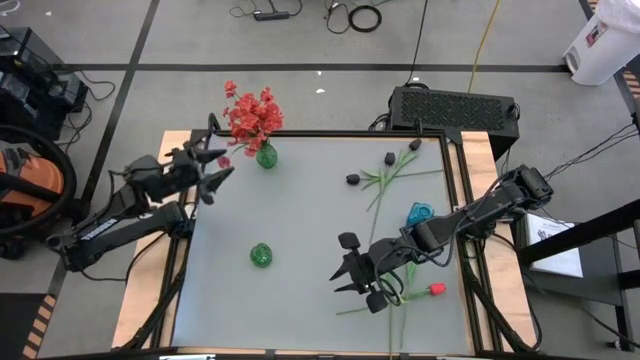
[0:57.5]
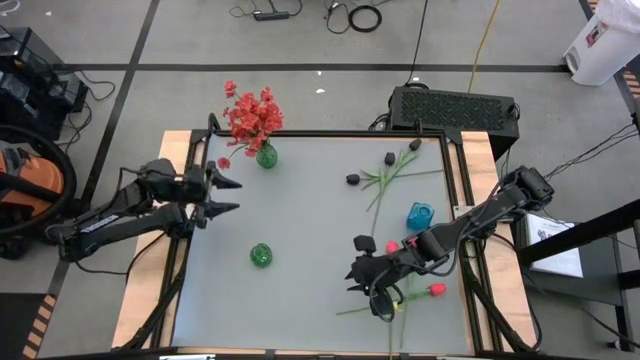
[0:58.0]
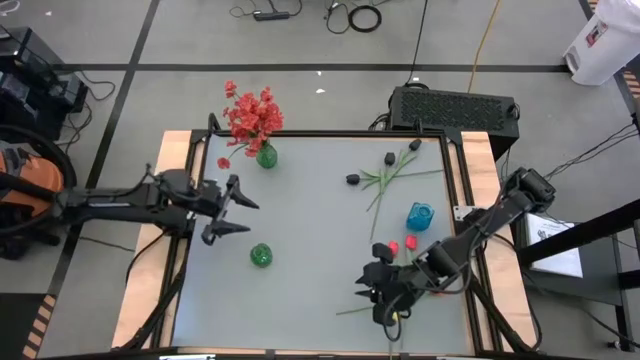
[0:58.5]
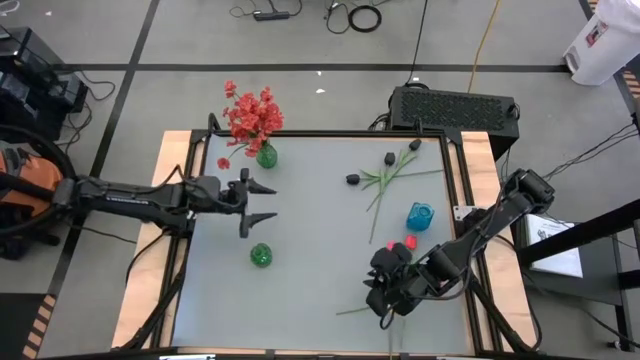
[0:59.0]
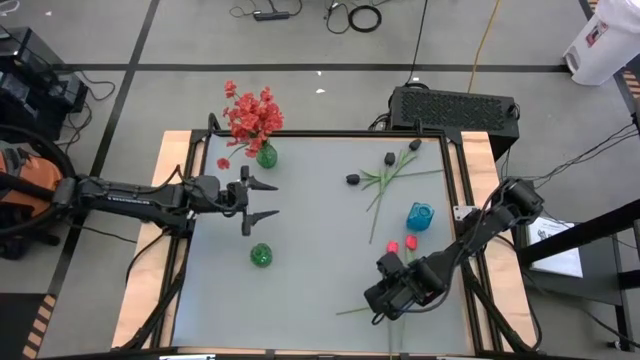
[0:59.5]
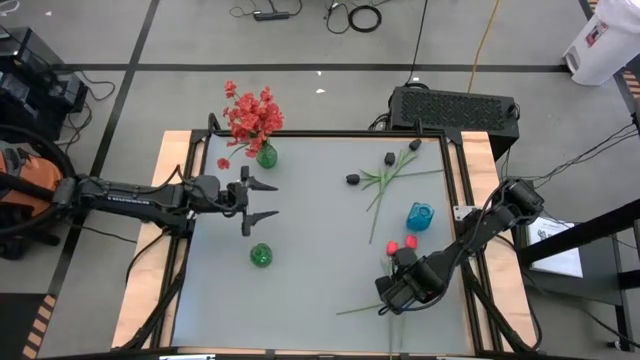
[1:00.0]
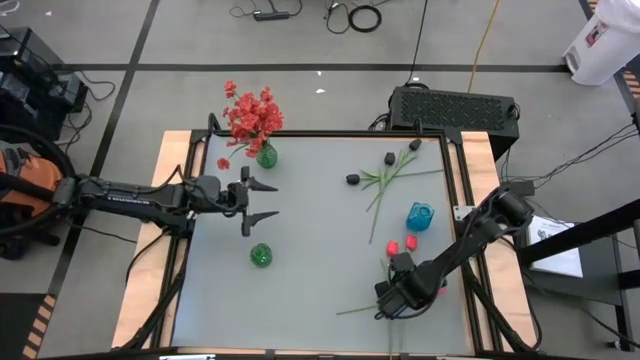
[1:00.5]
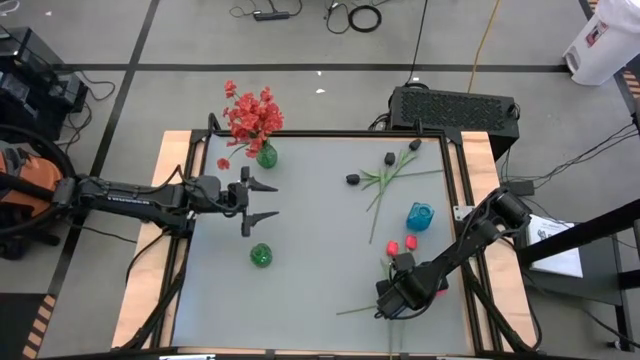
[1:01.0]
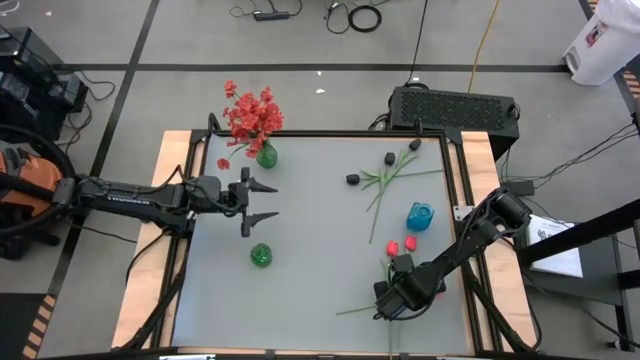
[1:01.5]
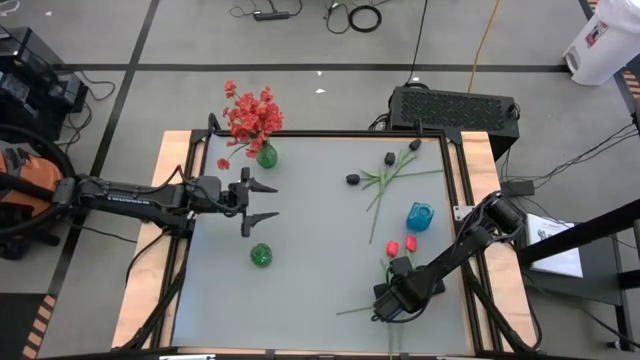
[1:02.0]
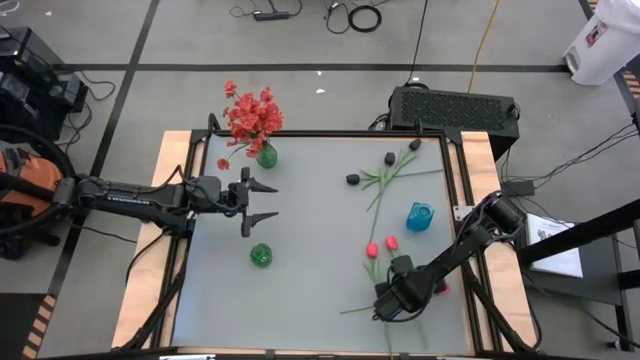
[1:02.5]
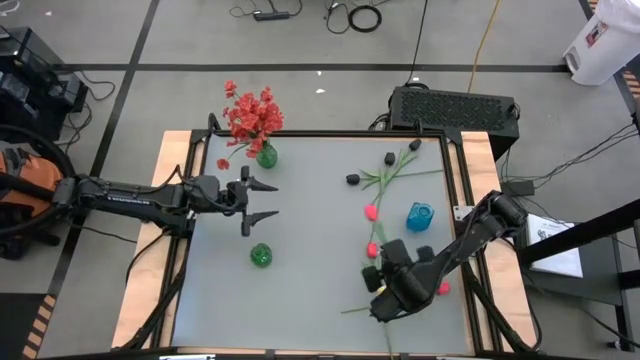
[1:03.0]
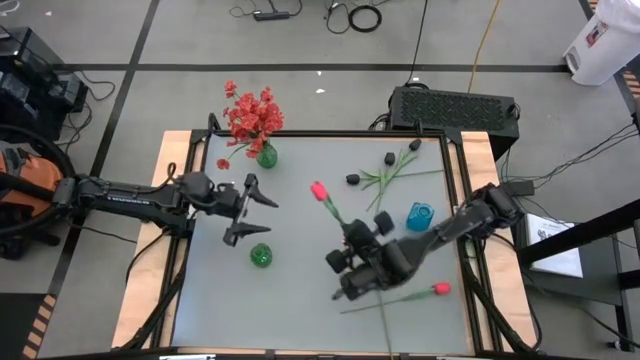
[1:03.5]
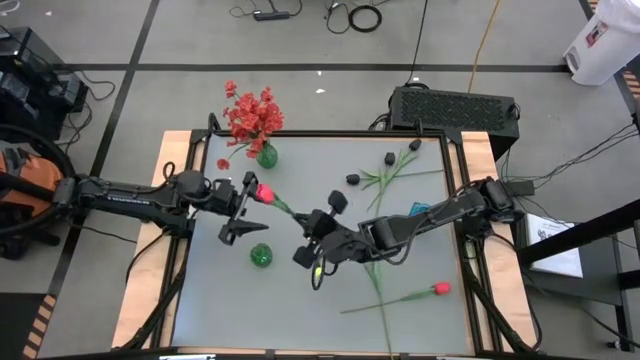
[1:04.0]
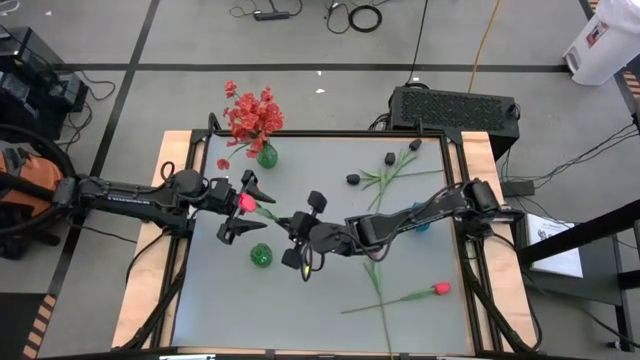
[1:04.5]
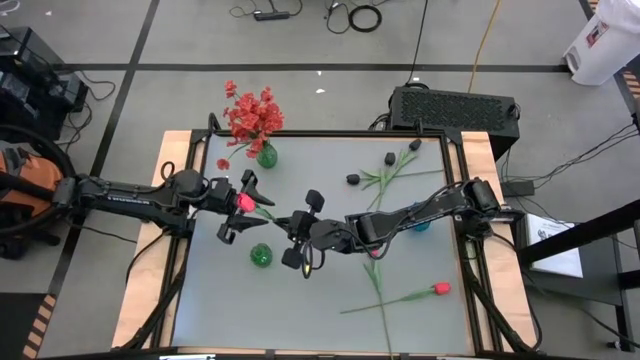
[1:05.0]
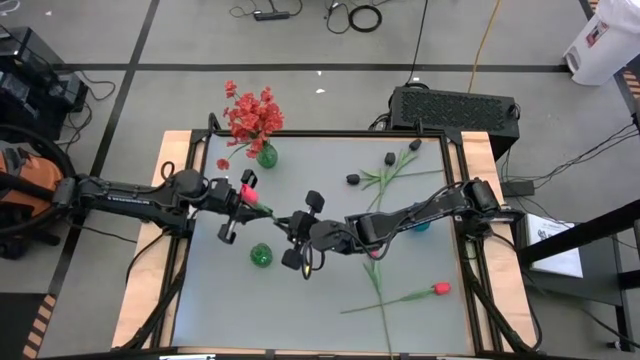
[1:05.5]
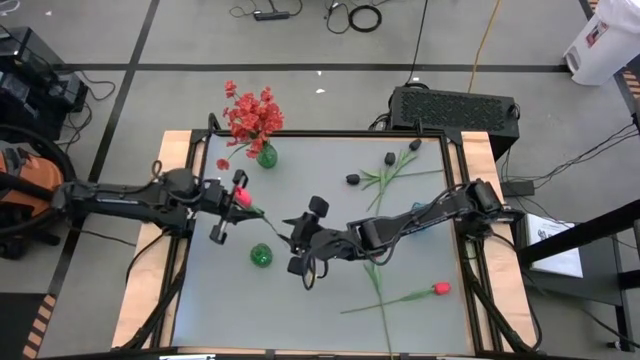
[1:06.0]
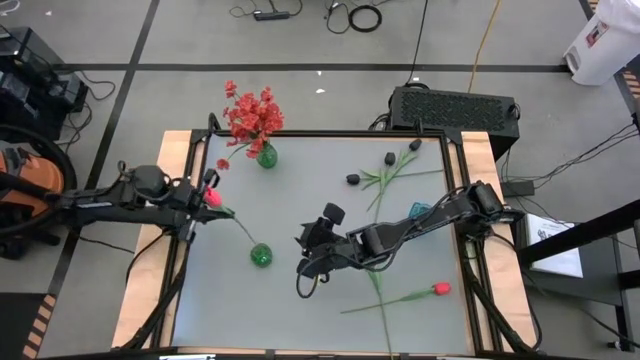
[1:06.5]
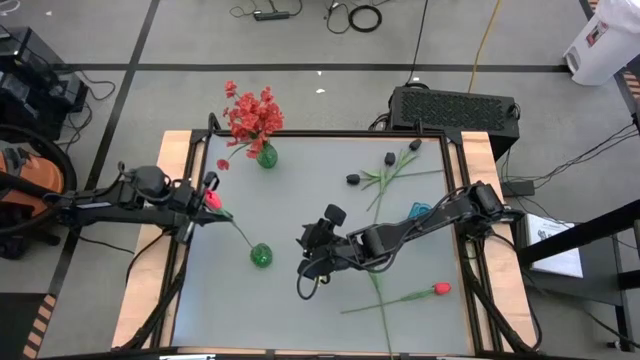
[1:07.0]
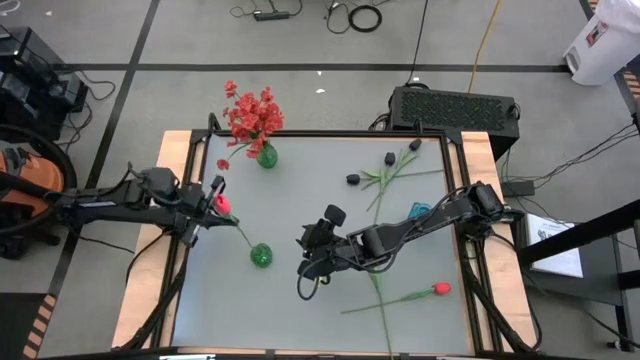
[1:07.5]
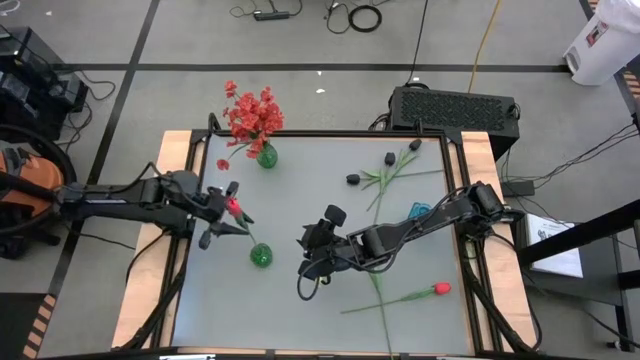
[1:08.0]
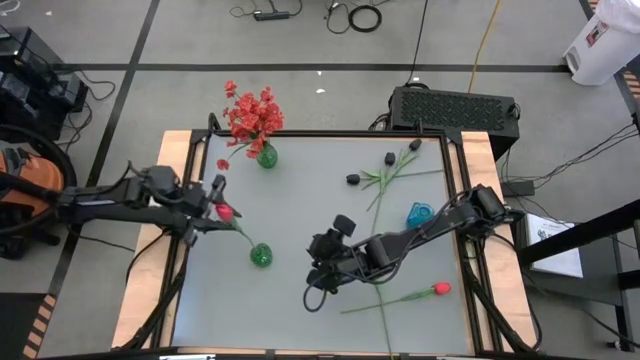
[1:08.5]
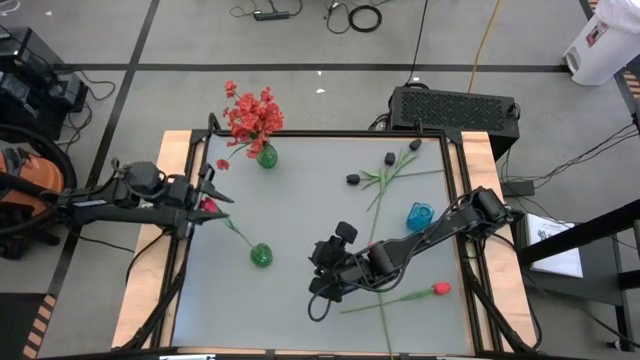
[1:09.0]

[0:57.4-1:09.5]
Task: Sort flowers into vase by color
Put the top red flower into the bottom green vase

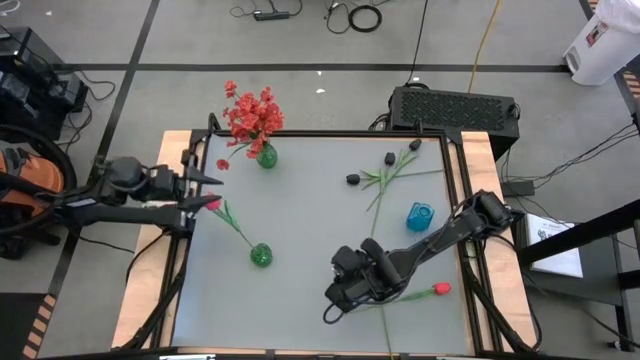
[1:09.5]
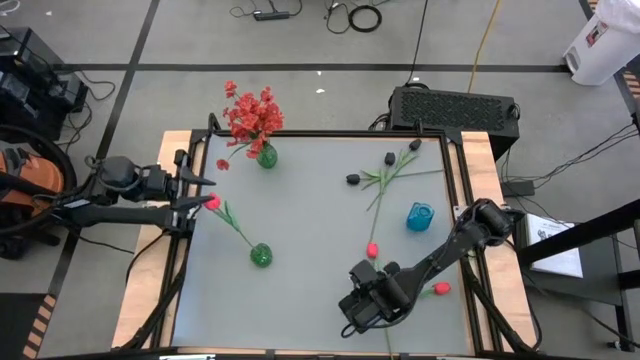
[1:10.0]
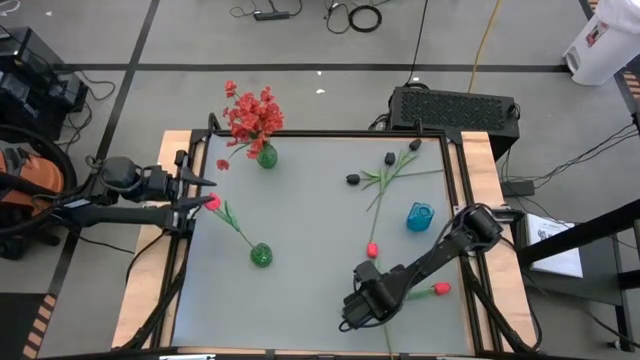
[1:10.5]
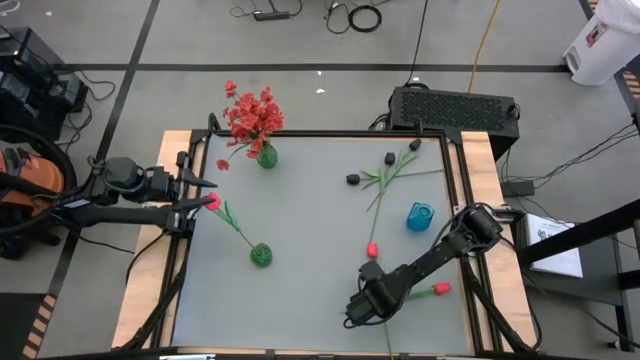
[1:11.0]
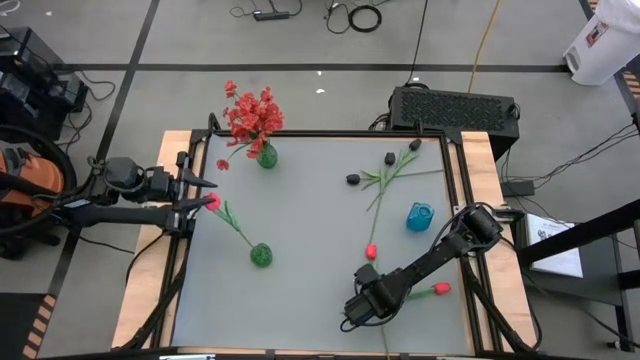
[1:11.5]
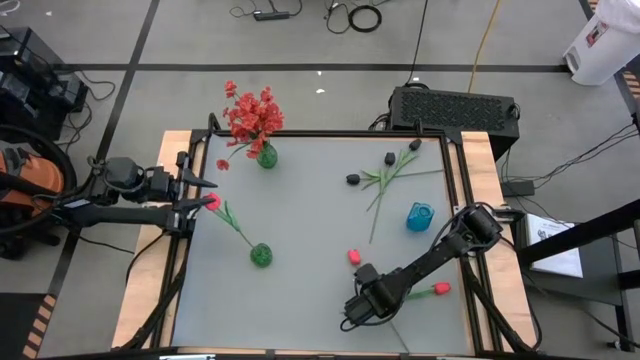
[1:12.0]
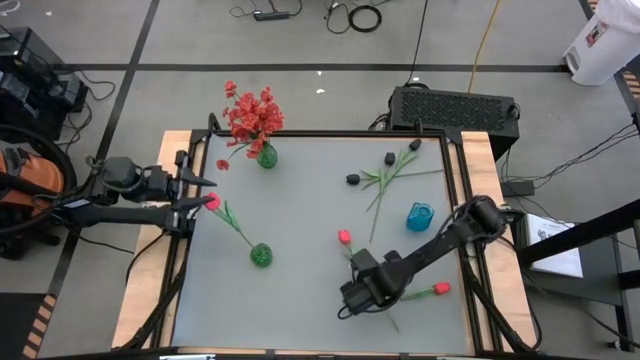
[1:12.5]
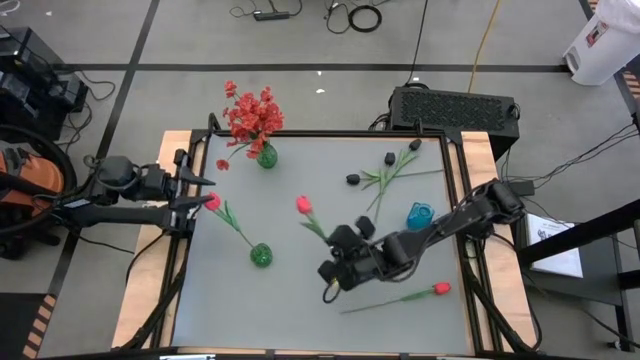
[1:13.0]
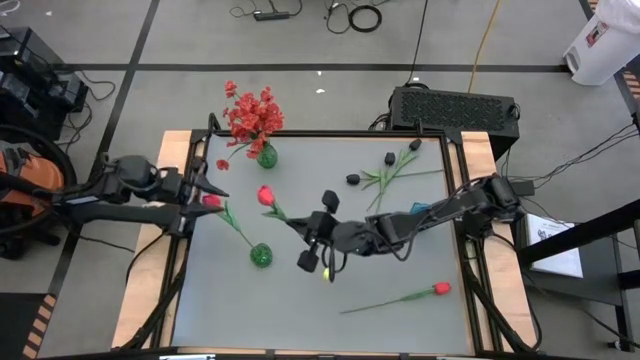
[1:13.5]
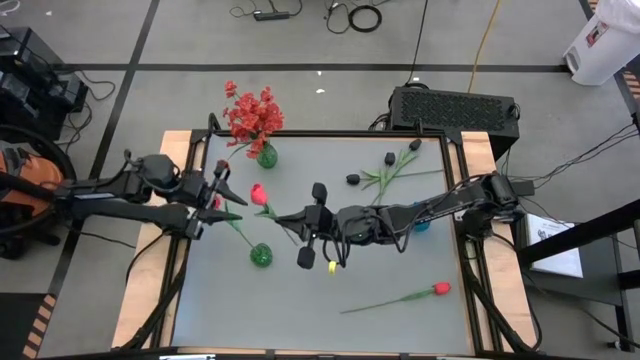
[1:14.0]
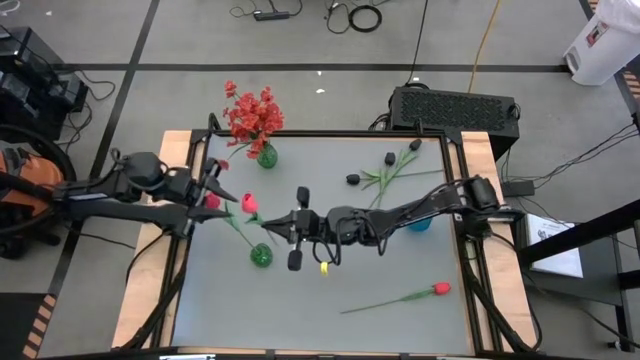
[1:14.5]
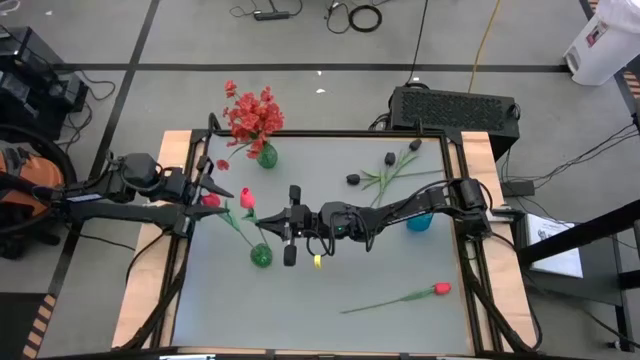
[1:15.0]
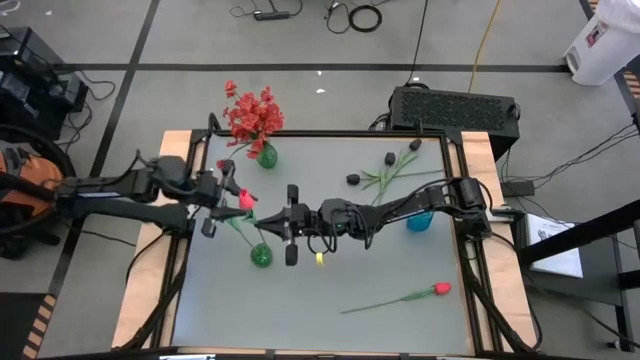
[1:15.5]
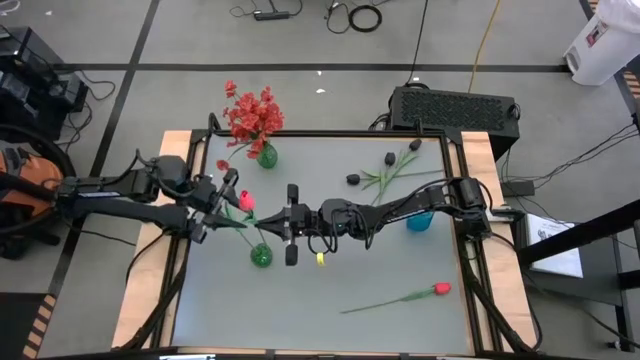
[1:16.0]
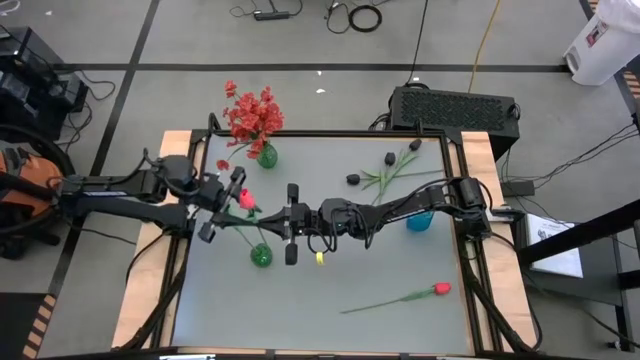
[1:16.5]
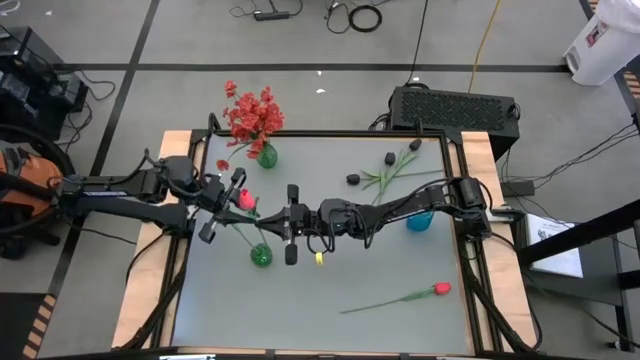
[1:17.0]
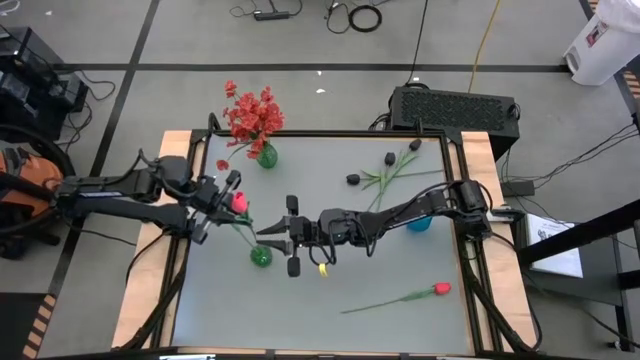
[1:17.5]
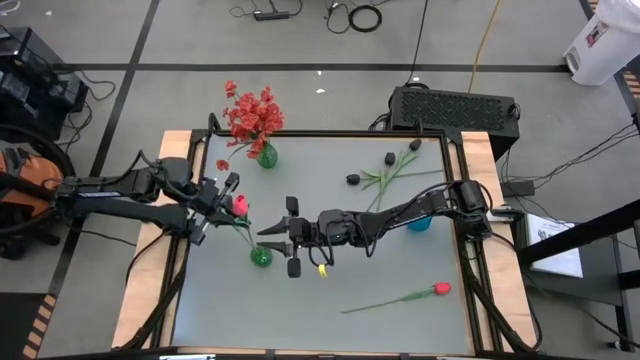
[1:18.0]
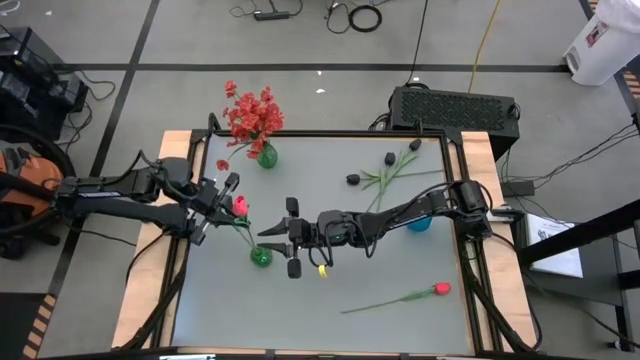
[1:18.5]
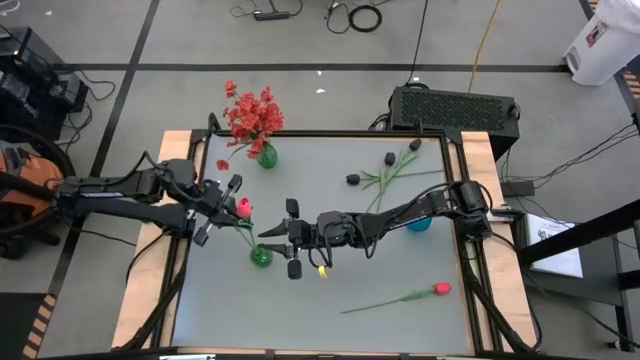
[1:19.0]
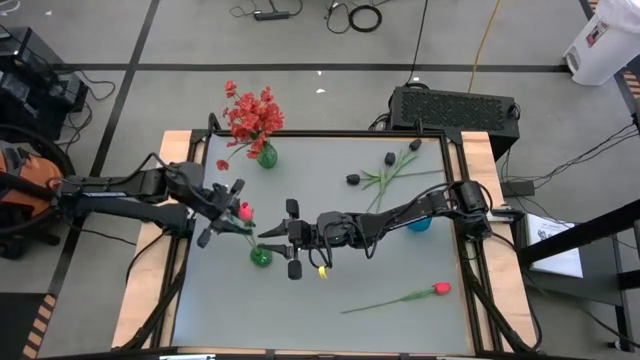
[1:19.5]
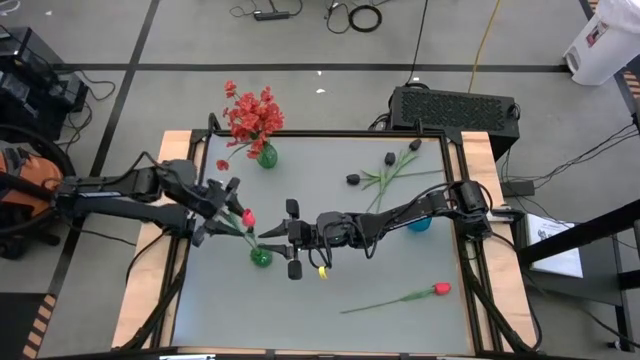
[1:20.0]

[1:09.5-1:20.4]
Put the top red flower into the bottom green vase
